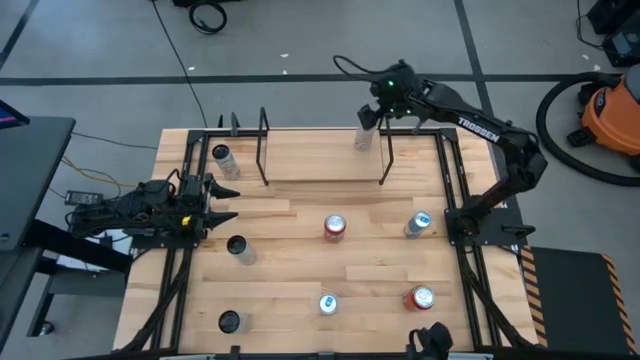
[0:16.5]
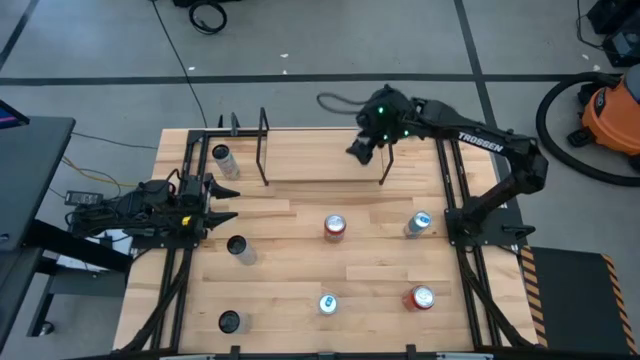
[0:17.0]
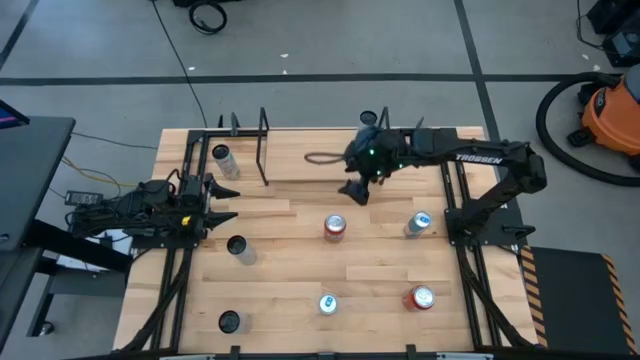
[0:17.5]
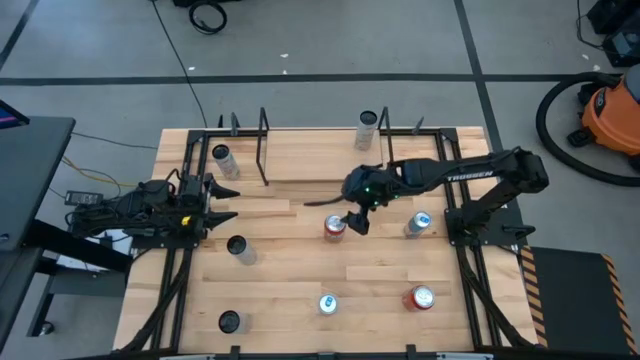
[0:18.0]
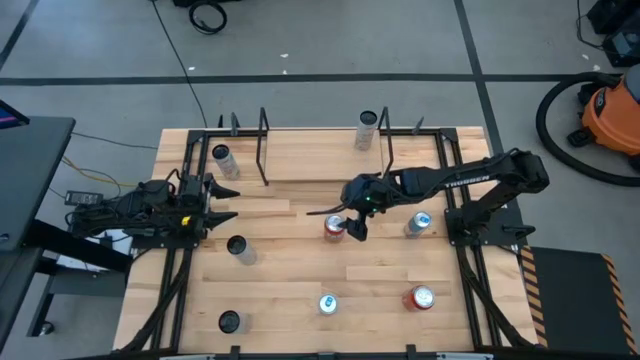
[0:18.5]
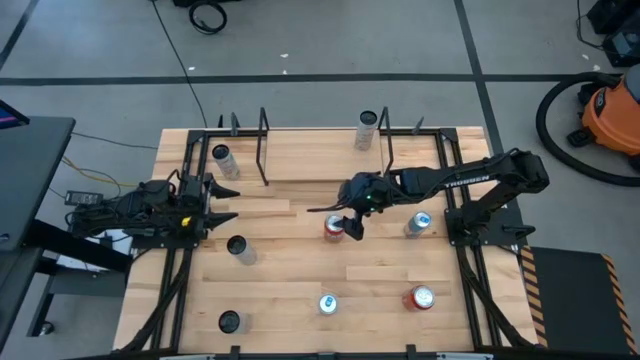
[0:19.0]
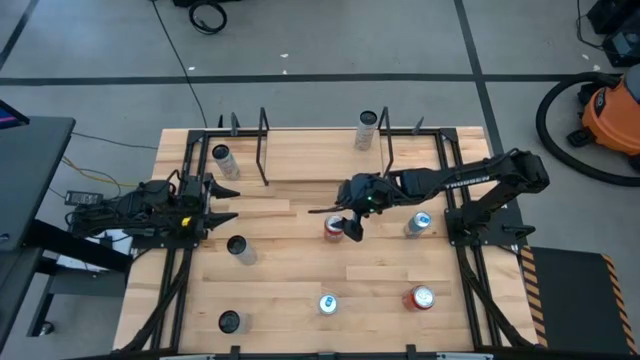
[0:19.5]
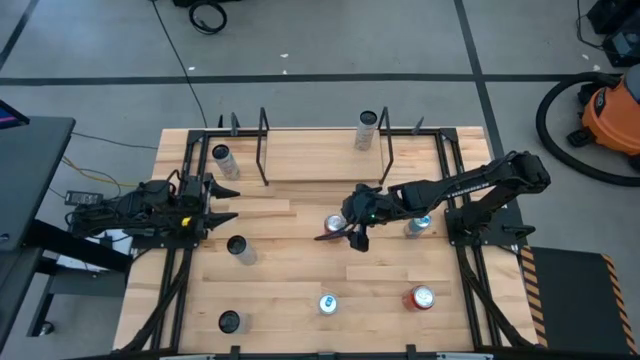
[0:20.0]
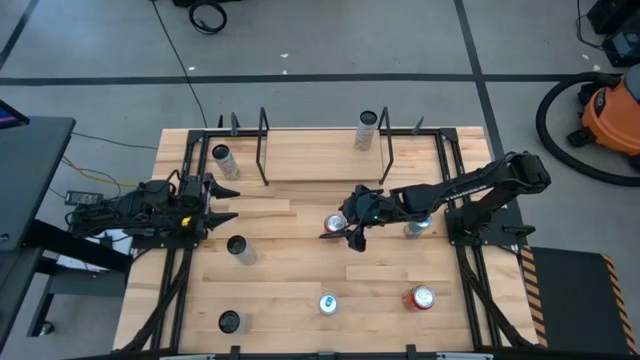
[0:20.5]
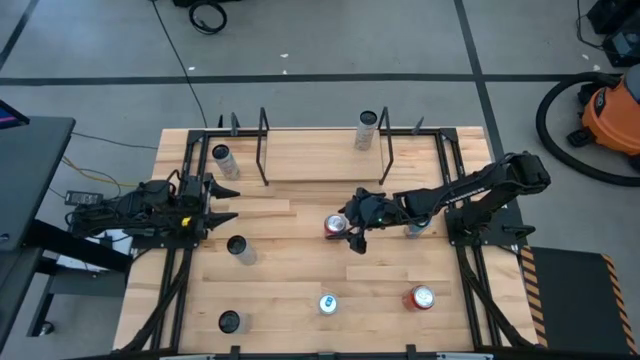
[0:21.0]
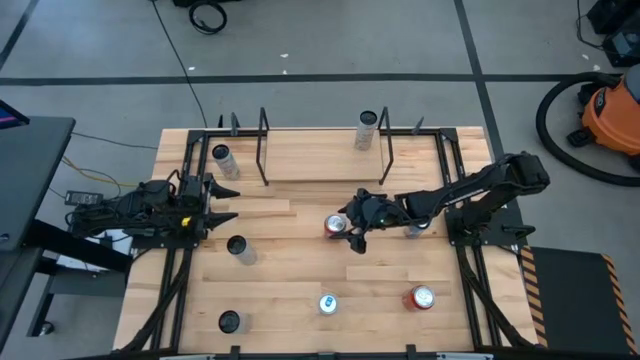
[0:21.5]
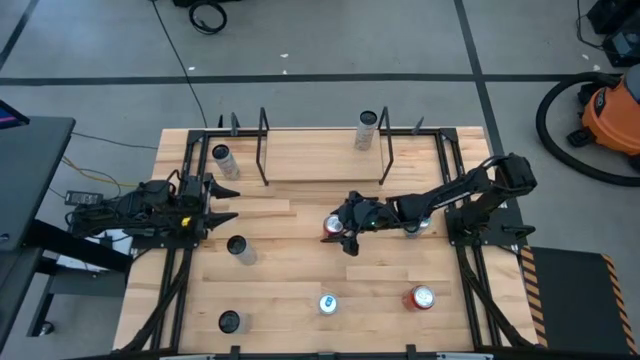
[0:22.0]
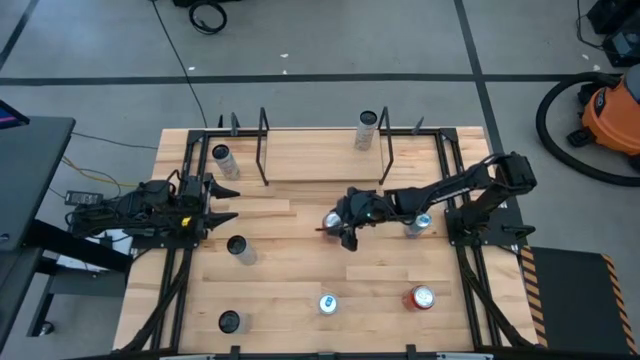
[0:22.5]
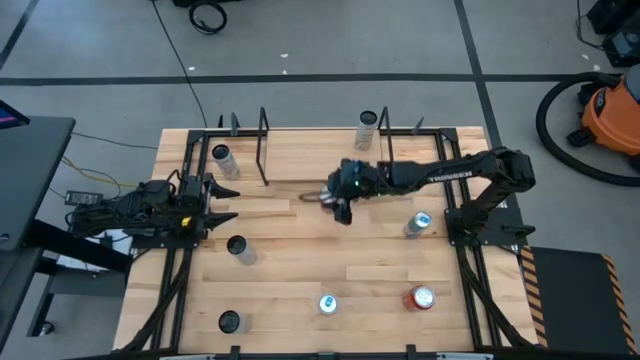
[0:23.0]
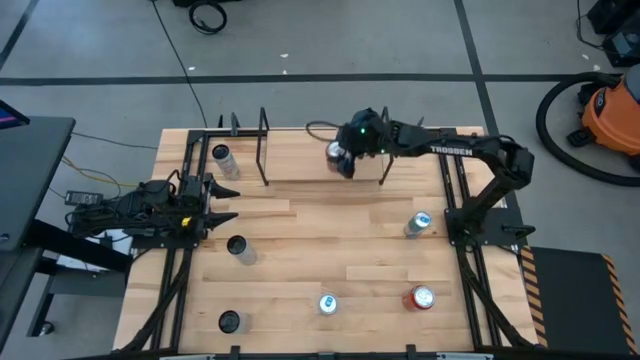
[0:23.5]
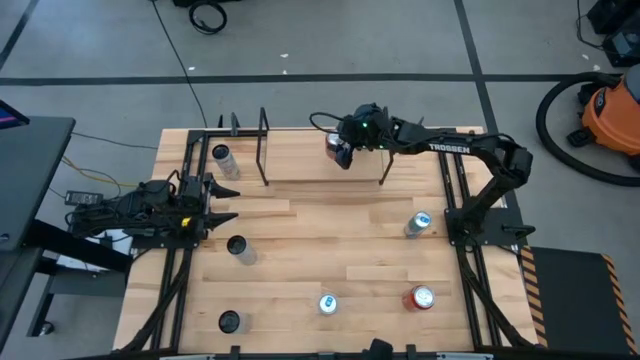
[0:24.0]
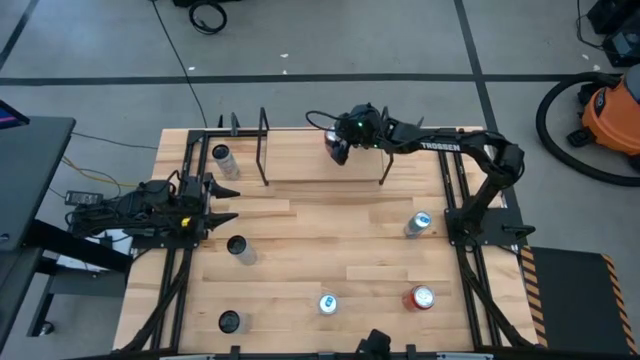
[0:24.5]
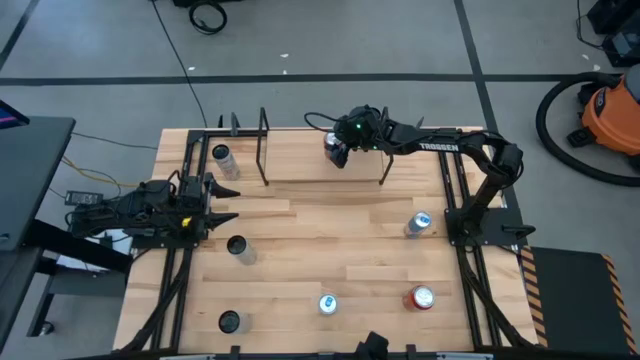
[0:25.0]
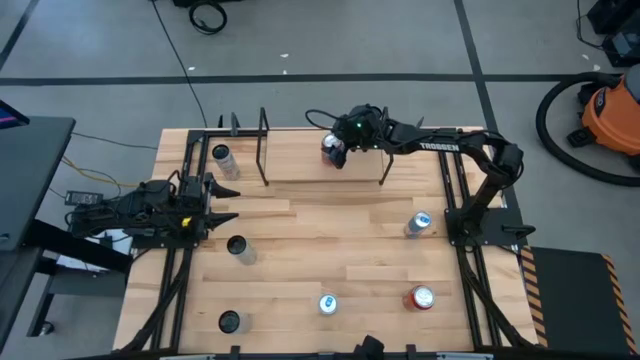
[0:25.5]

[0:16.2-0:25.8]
Task: Place canned beverage on shelf
Put the top red soda can on the shelf

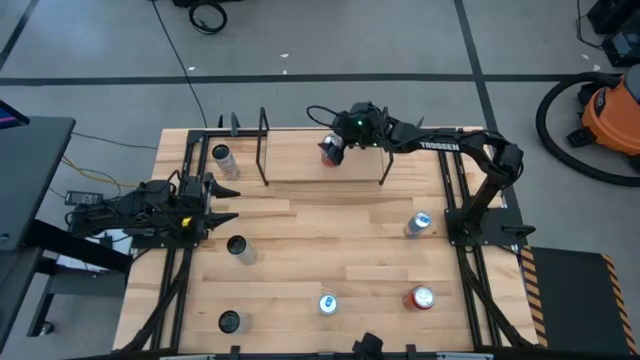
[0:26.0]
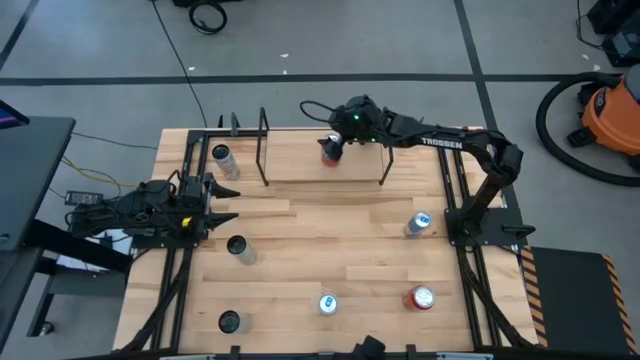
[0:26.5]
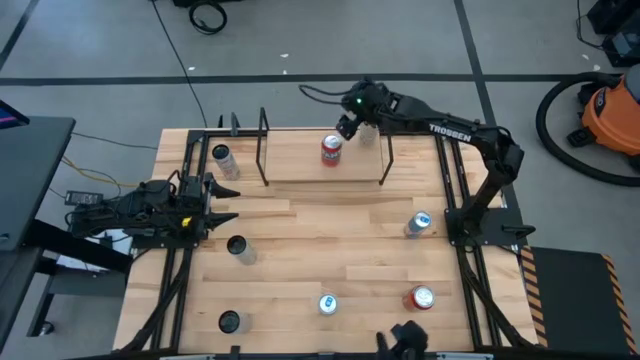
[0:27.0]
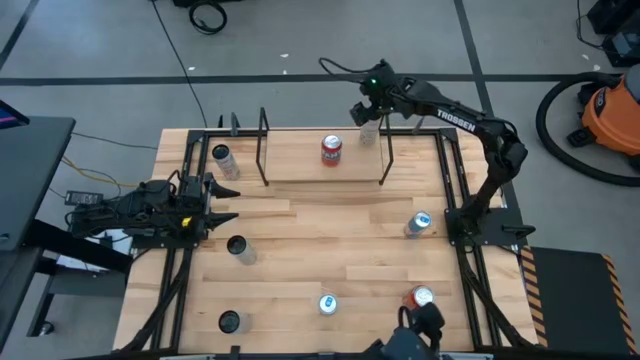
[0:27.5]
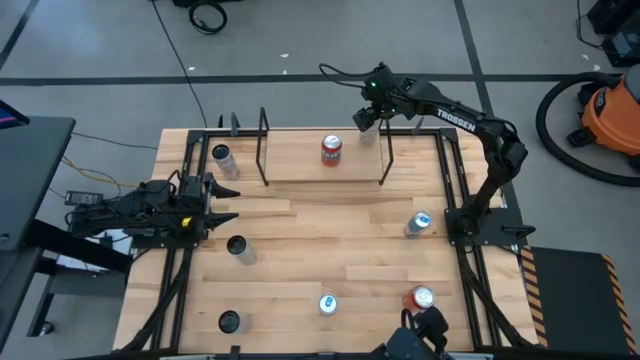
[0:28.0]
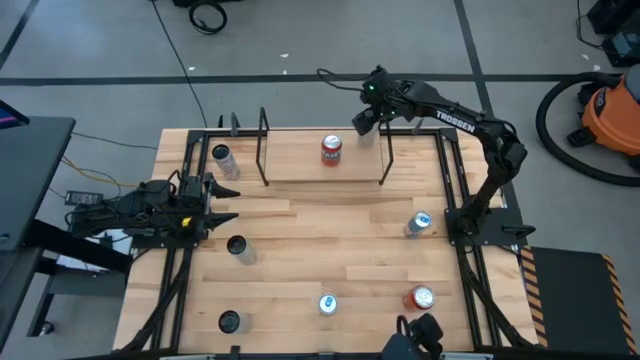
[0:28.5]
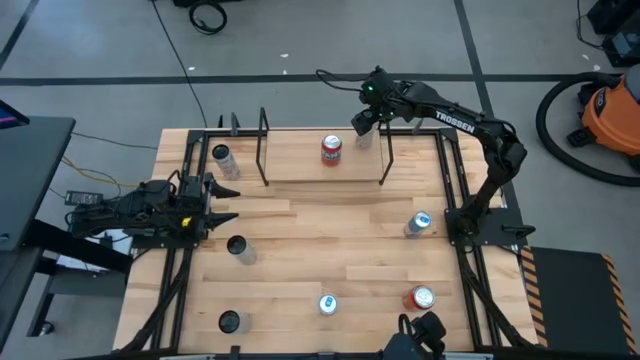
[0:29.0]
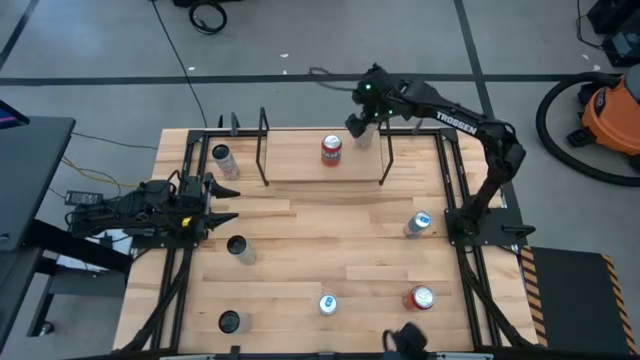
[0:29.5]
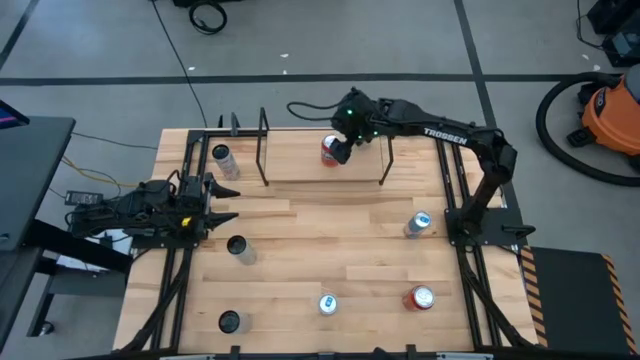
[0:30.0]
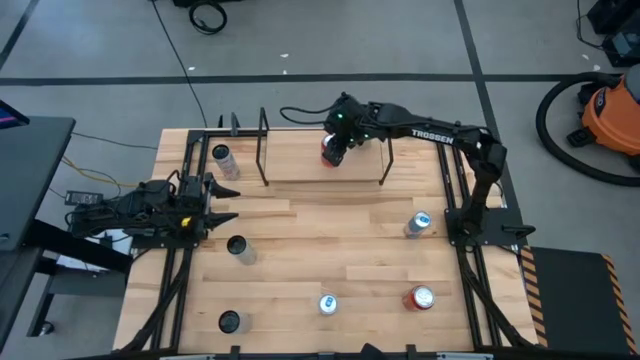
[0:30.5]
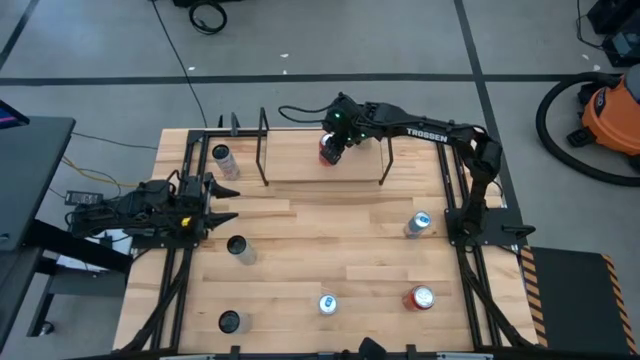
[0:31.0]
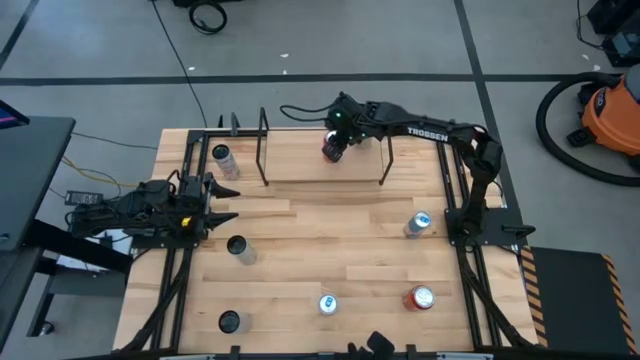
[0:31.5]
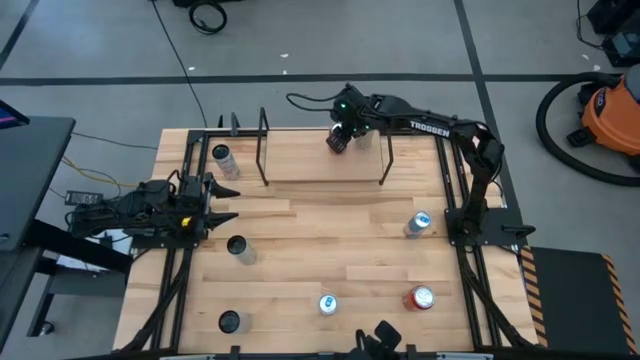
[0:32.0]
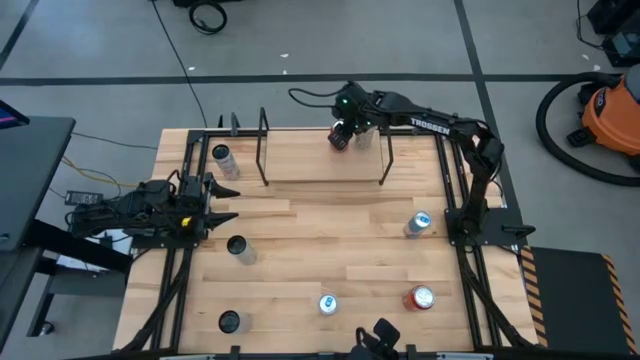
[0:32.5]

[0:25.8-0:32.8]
Adjust the soda cans on the shelf

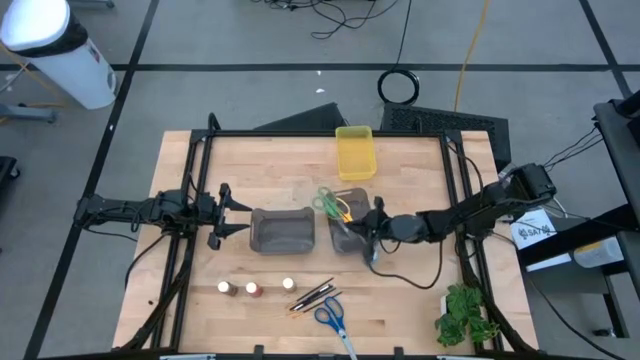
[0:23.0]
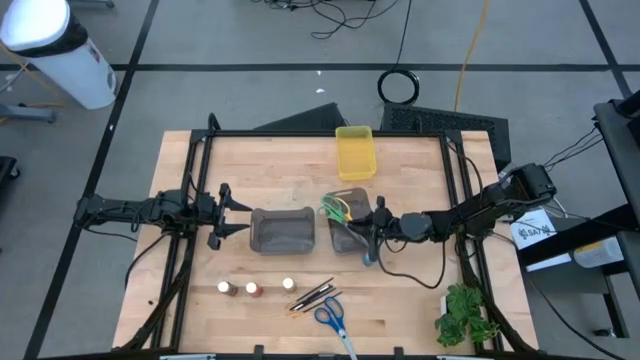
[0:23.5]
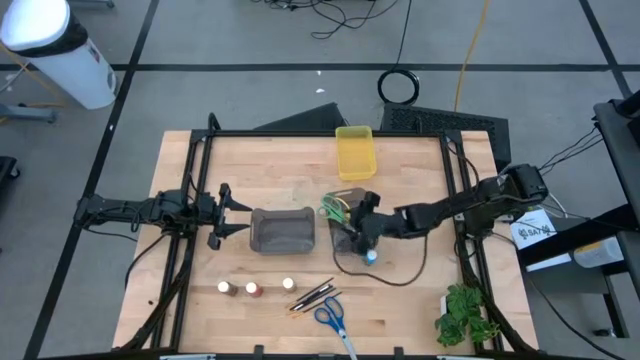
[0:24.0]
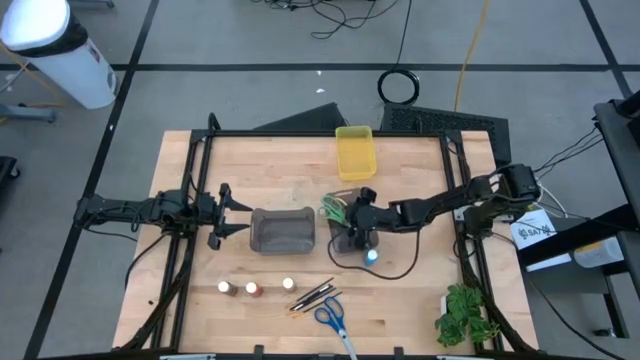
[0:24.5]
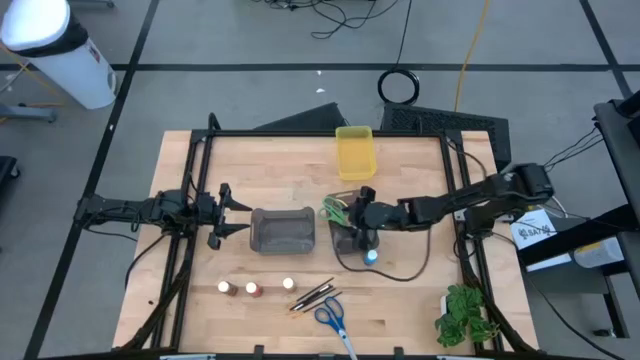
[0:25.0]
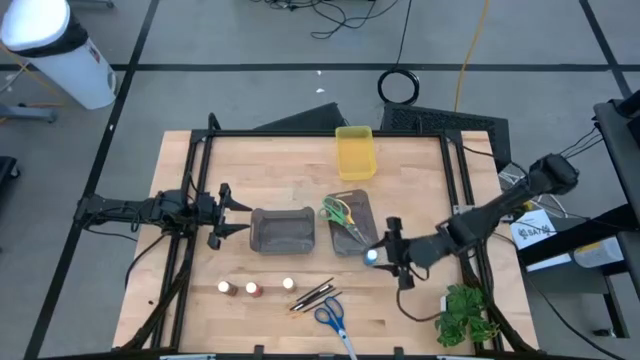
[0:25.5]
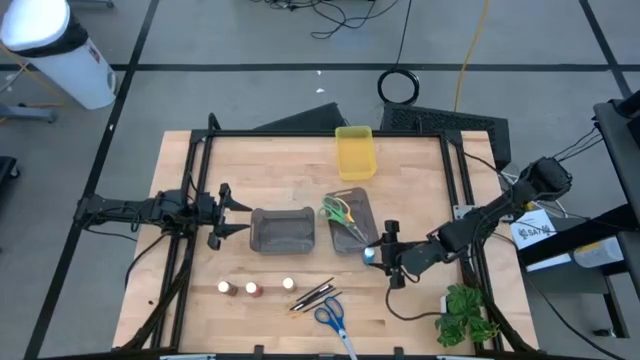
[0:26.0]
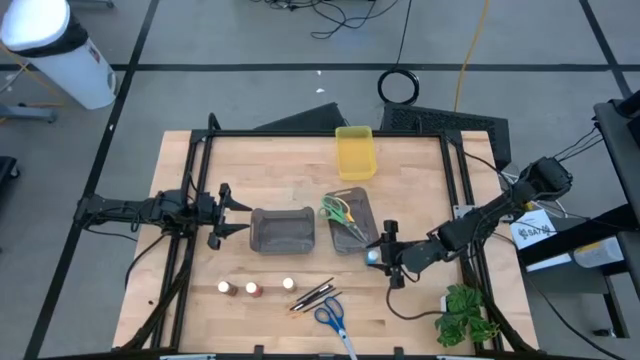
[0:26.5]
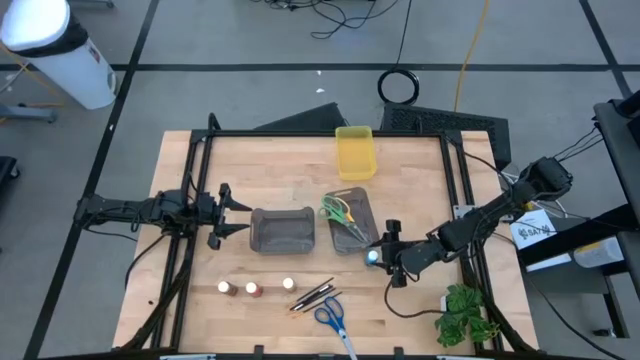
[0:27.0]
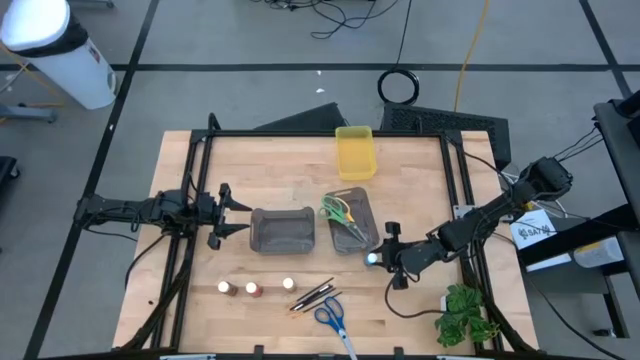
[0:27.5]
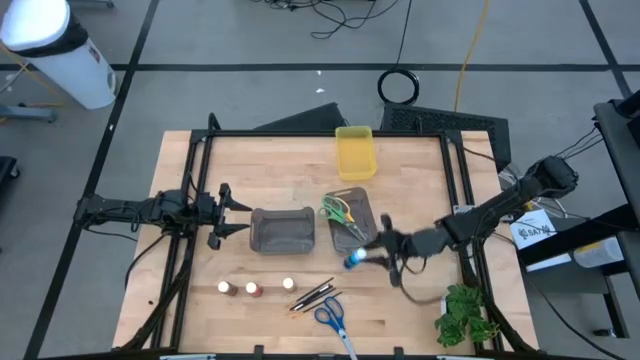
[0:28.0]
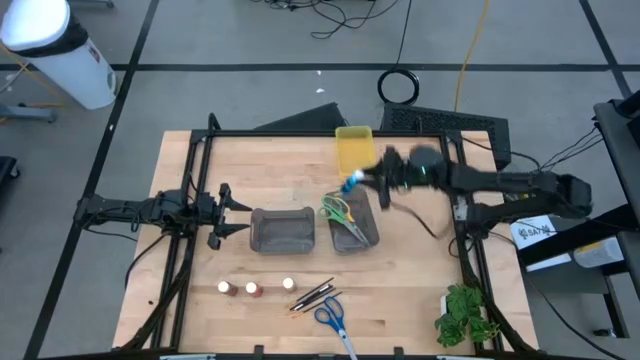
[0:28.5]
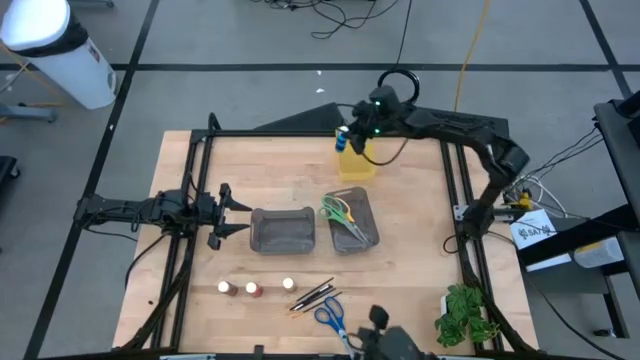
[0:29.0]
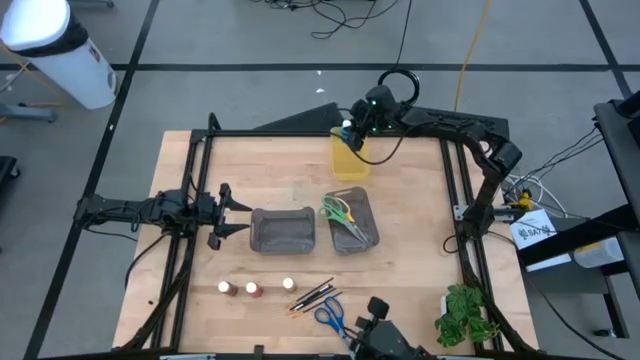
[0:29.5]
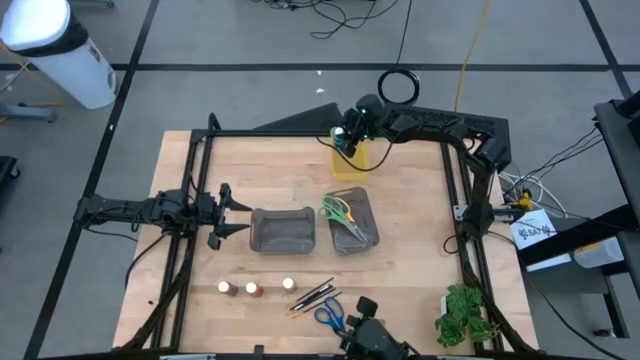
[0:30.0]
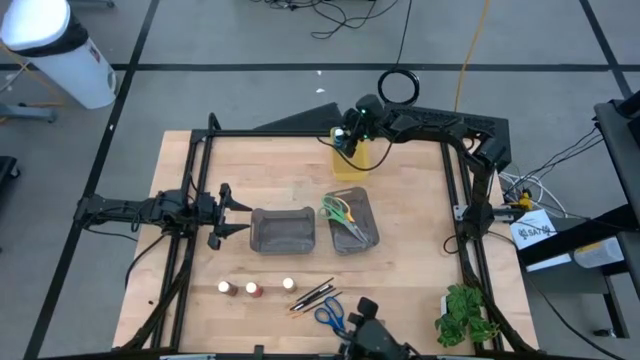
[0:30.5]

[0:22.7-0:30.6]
Task: Pick & Place Paint Supplies
Put the blue paint bottle into the yellow bin
